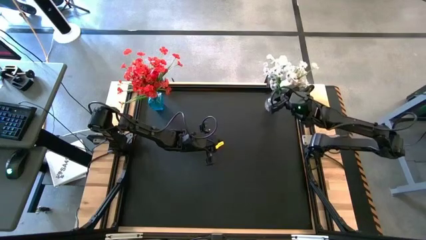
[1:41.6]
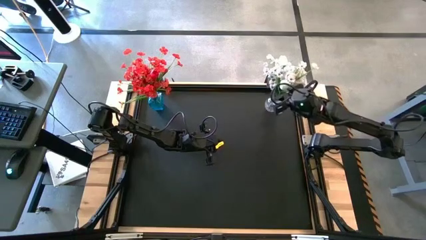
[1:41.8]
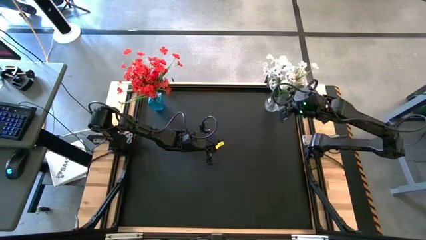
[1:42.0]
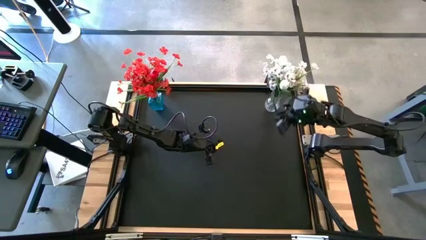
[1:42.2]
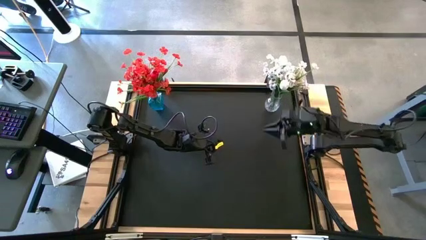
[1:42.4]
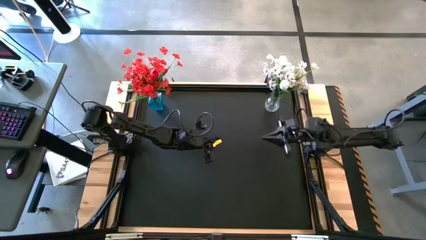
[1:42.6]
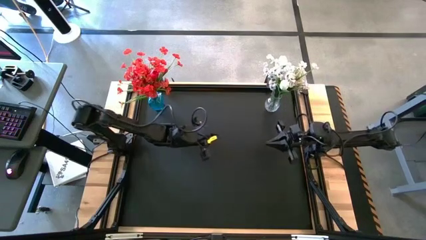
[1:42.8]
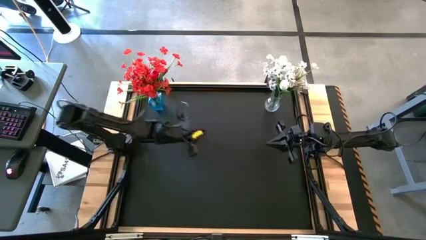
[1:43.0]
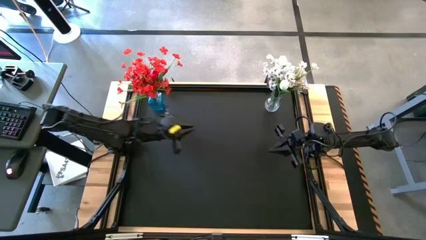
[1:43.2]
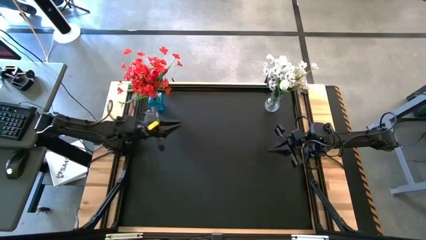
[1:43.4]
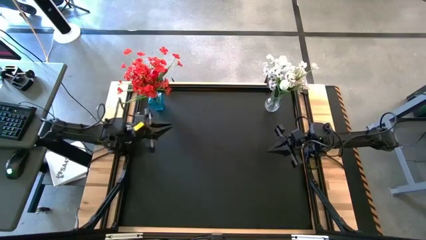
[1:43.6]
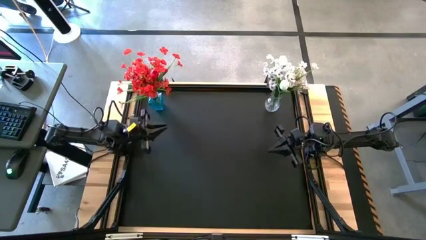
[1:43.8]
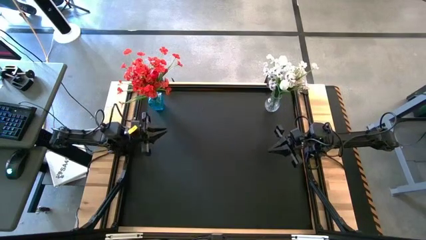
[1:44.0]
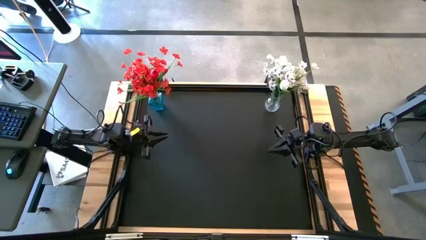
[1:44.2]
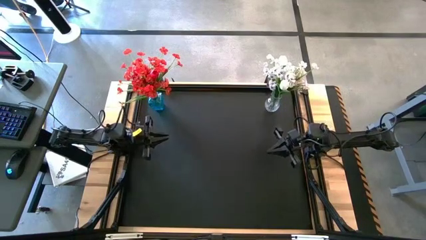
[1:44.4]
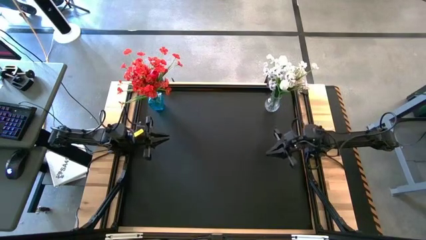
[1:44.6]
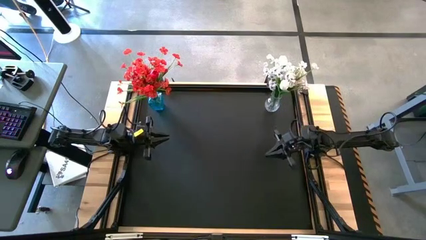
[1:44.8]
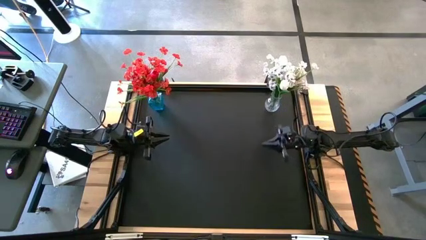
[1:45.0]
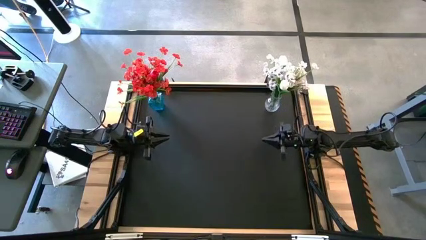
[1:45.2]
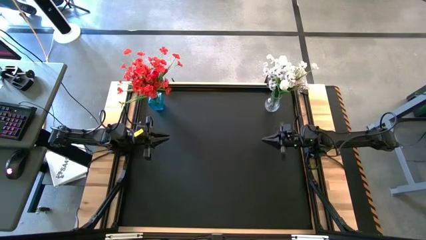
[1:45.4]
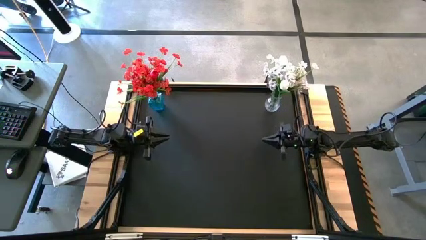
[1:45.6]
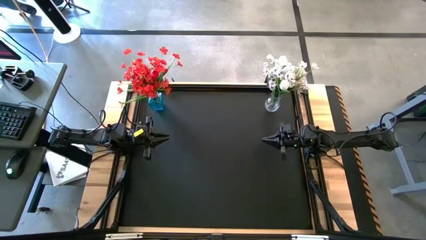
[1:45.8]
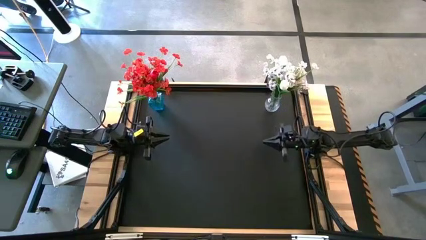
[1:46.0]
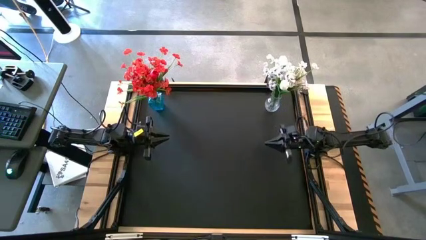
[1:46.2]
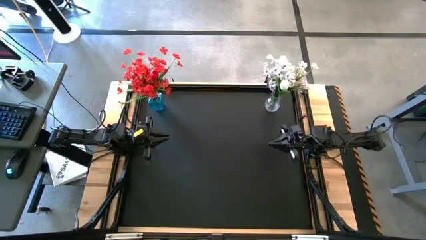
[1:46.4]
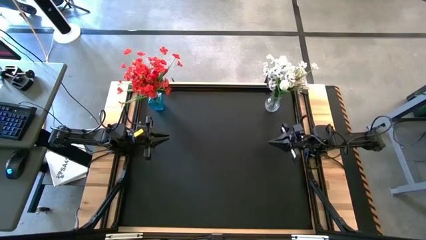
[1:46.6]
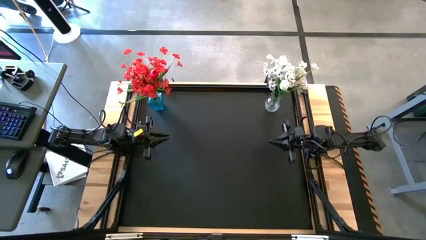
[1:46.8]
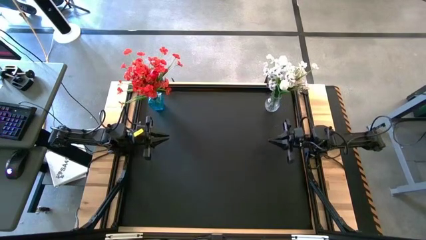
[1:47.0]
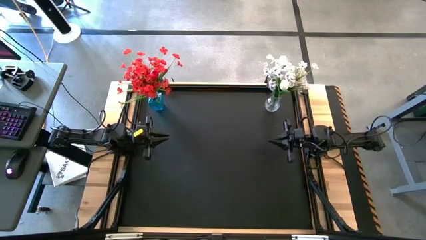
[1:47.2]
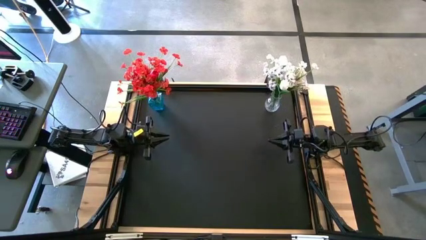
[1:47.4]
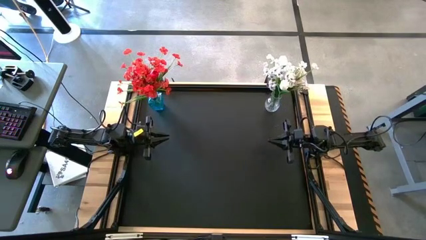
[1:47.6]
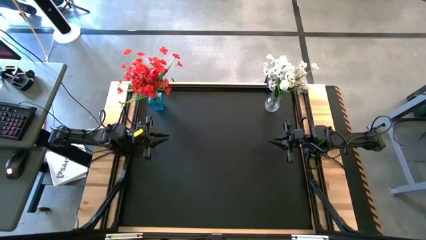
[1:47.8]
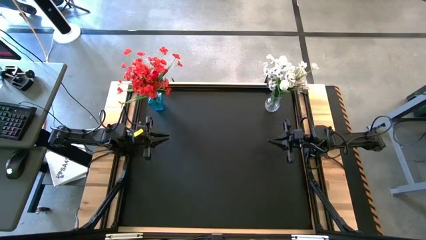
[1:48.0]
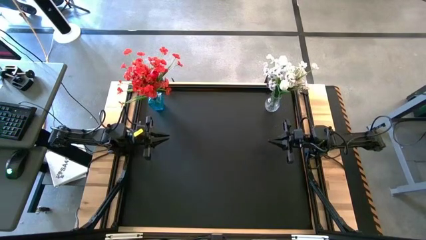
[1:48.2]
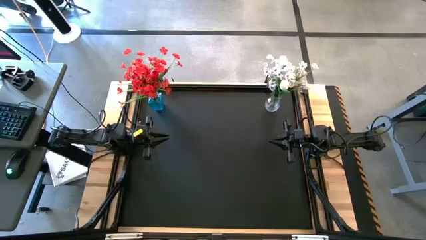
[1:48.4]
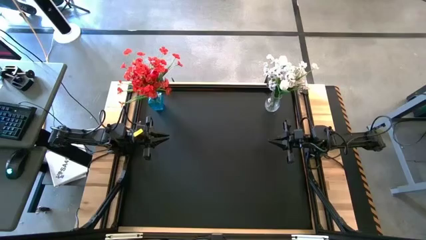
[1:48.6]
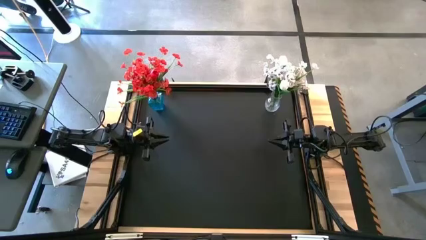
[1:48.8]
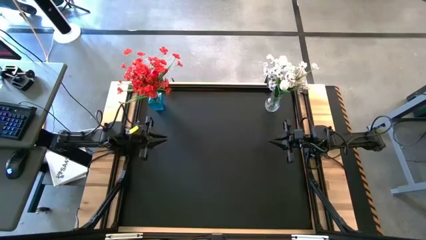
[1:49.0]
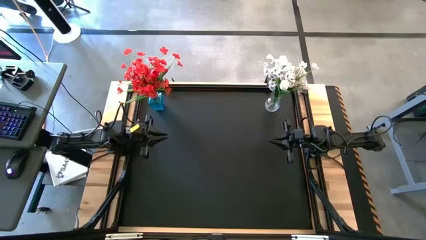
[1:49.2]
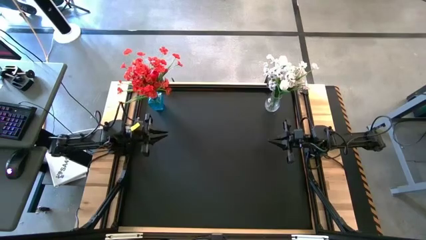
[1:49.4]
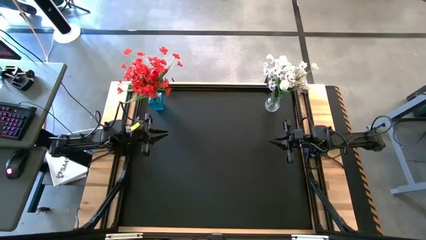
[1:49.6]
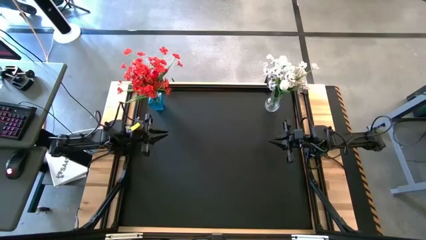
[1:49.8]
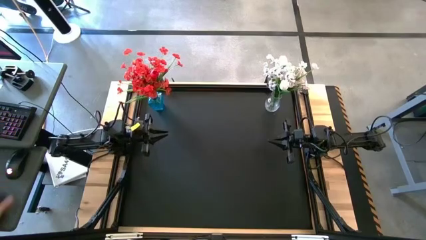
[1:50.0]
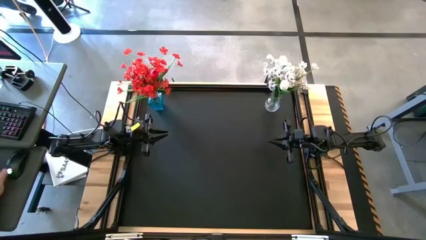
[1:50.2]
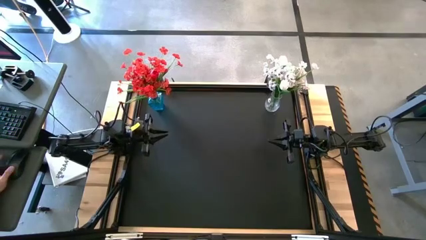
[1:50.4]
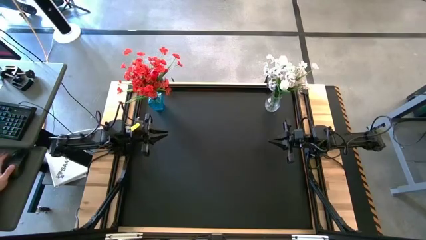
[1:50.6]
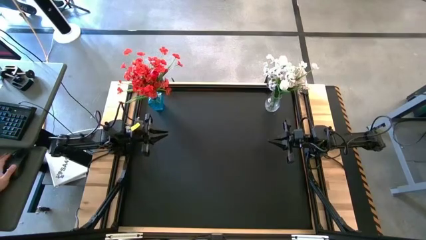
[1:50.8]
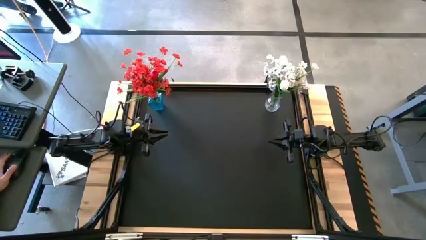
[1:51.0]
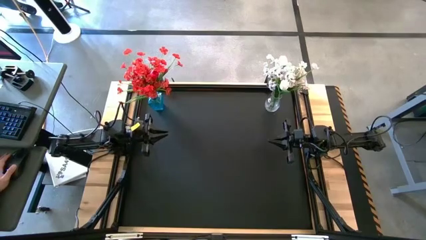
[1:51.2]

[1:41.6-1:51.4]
Task: Sort flowers into vase by color
Return to Home Position

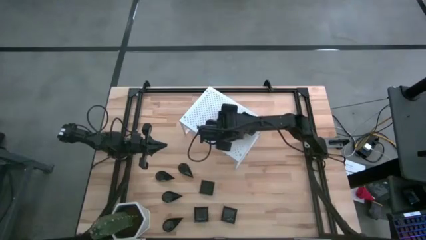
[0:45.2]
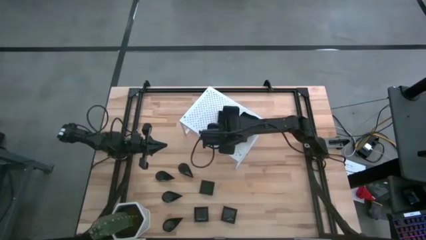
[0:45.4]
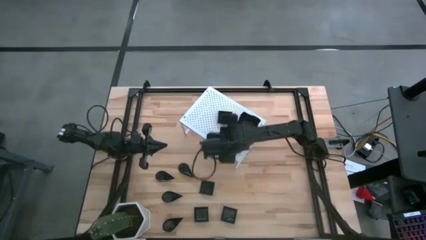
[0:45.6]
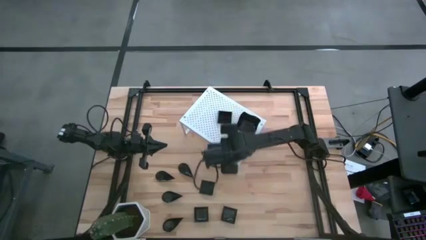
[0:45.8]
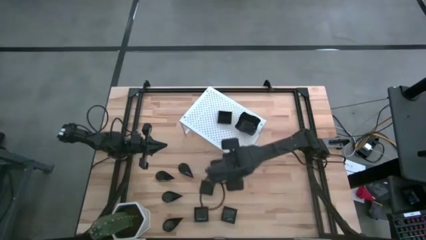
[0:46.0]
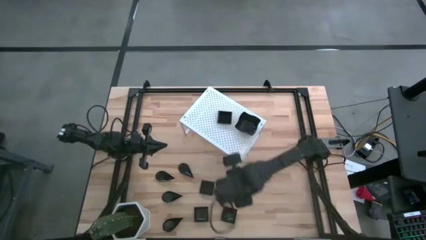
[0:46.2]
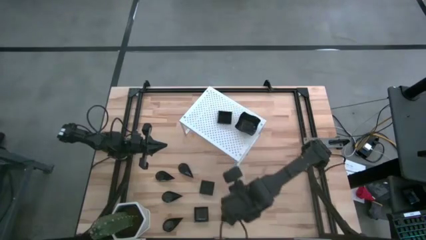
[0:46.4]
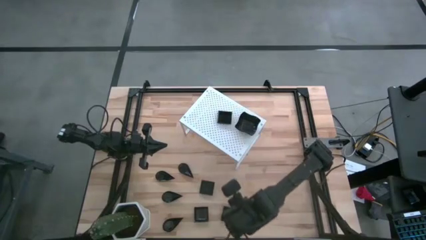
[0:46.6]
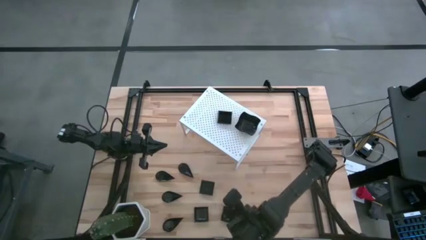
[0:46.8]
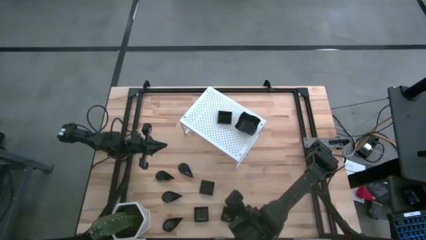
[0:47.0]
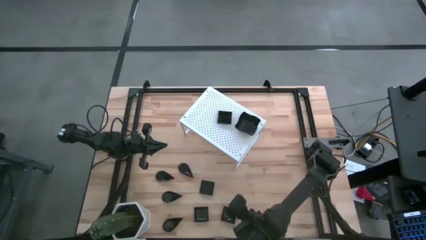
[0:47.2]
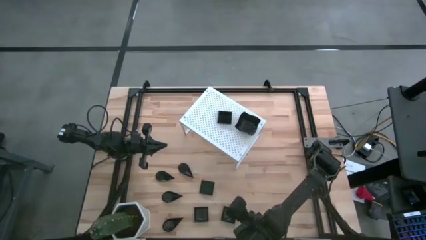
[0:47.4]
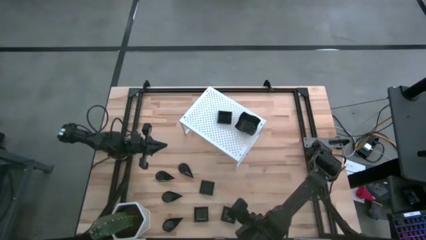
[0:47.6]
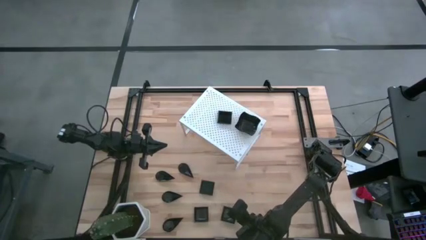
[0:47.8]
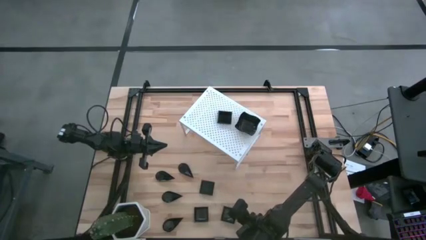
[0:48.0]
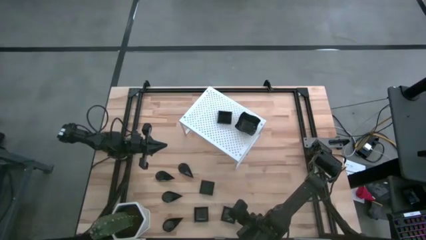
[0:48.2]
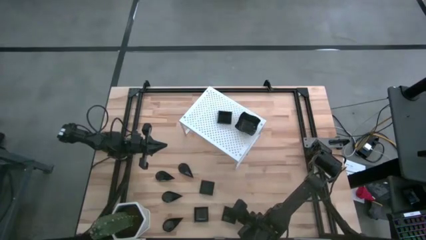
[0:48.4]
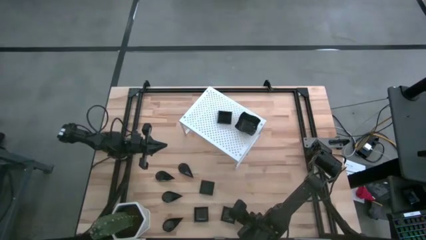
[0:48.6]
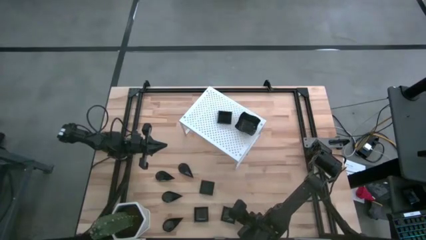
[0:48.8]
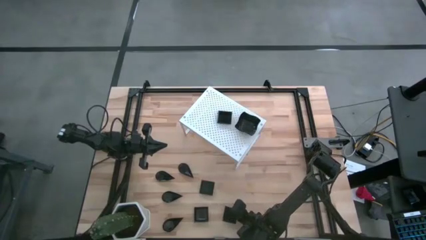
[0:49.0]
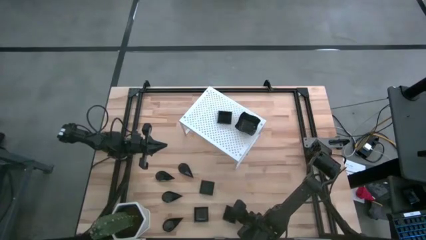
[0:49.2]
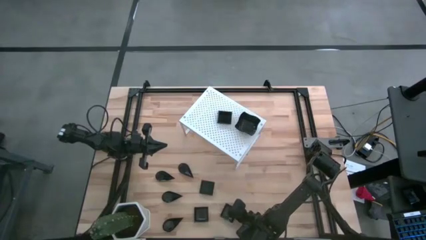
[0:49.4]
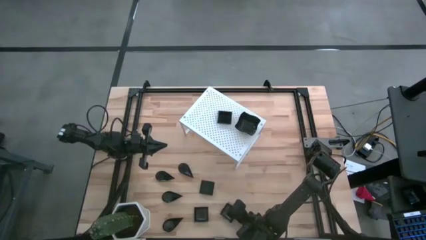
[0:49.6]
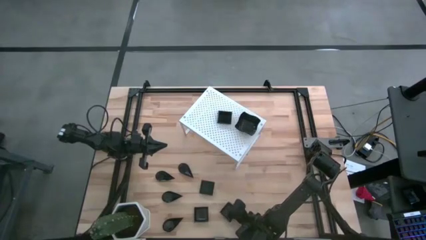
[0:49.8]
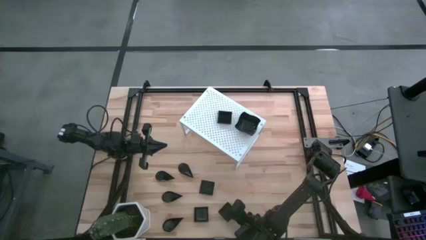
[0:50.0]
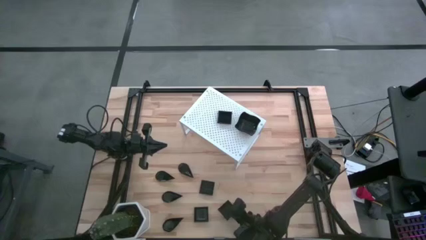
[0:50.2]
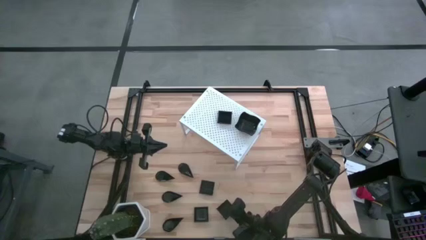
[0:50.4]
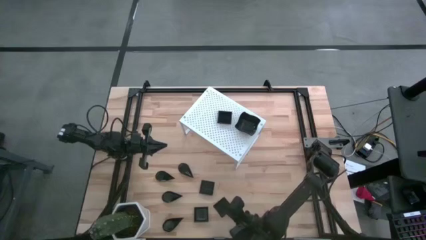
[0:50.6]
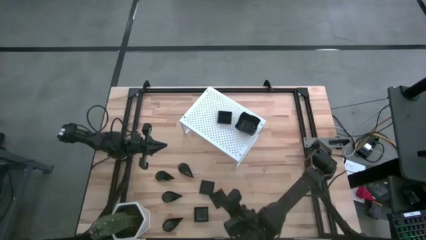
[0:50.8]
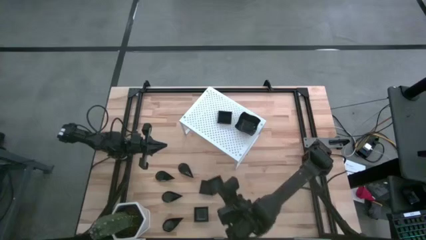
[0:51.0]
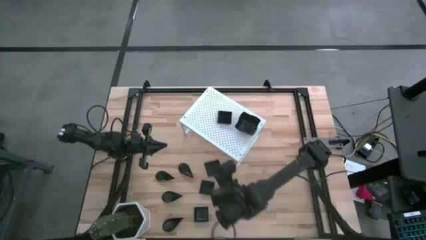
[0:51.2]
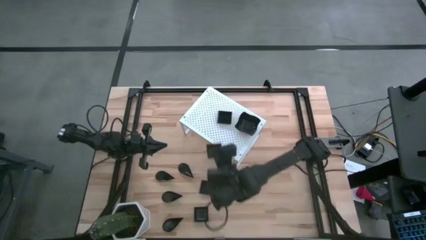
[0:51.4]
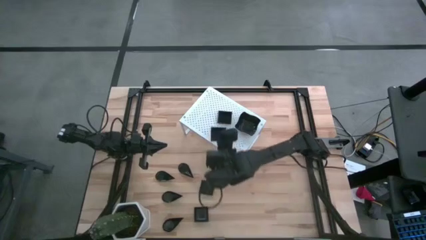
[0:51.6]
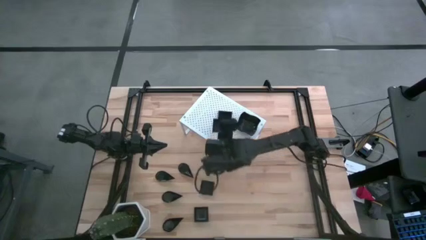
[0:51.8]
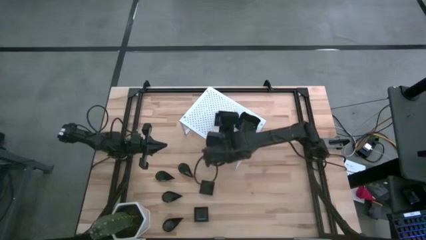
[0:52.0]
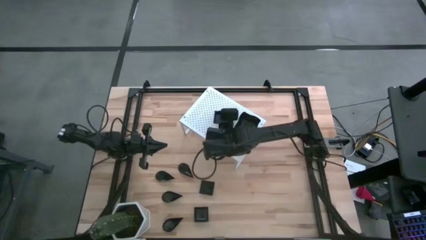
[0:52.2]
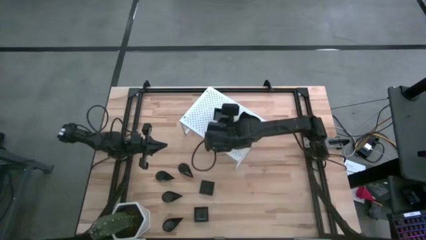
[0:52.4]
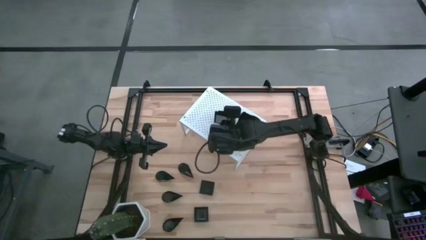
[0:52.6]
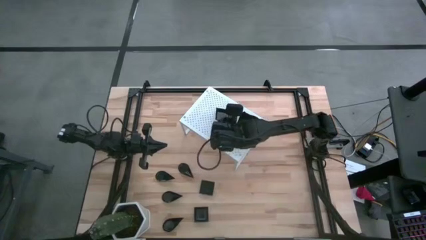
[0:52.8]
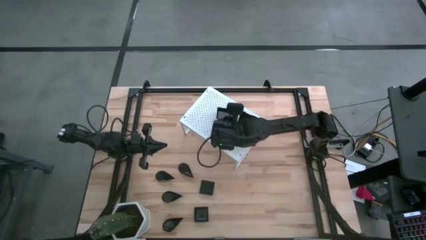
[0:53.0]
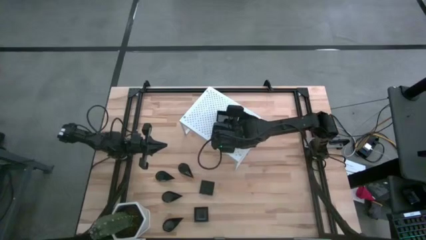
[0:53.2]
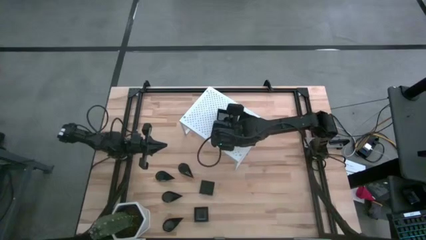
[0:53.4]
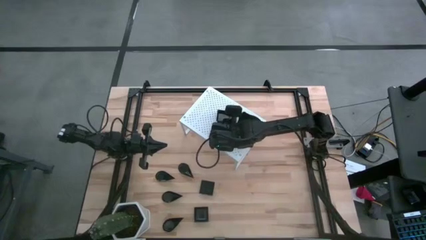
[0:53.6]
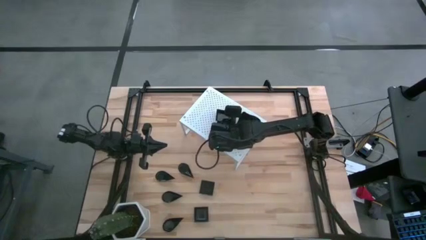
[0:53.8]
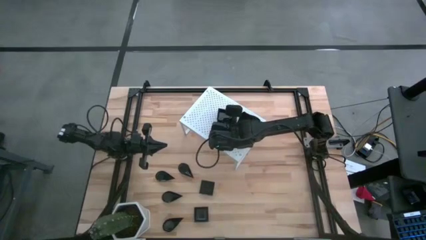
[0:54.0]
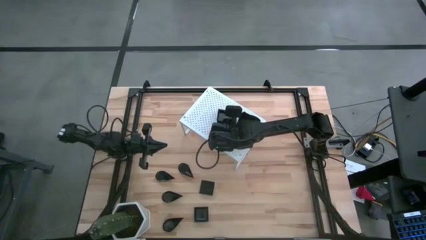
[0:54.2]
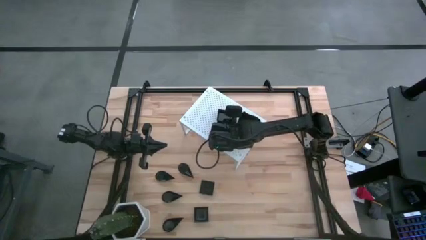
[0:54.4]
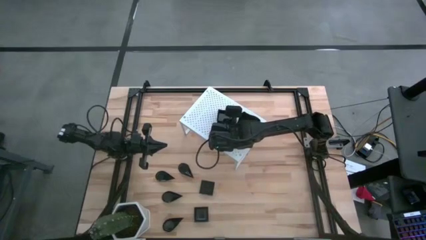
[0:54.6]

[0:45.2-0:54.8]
Task: Pick & Place Mini shaped plates
Stack the square plate on top of the other square plate on the shelf
